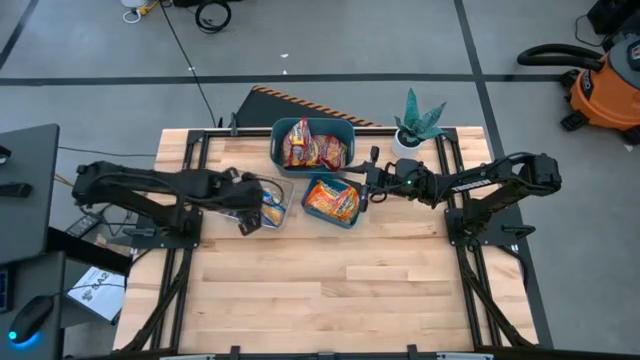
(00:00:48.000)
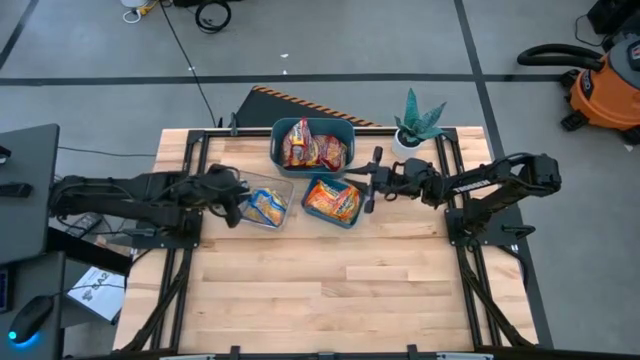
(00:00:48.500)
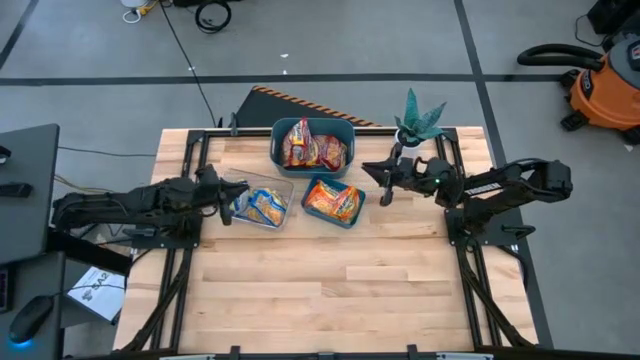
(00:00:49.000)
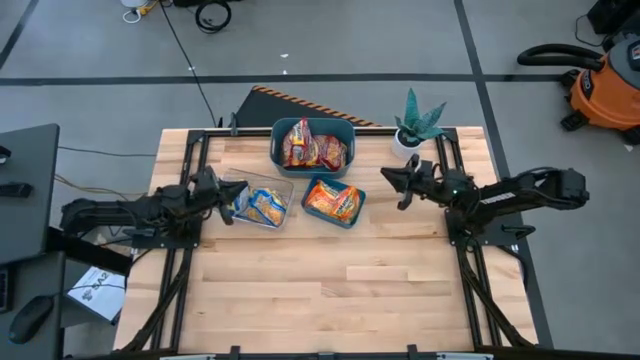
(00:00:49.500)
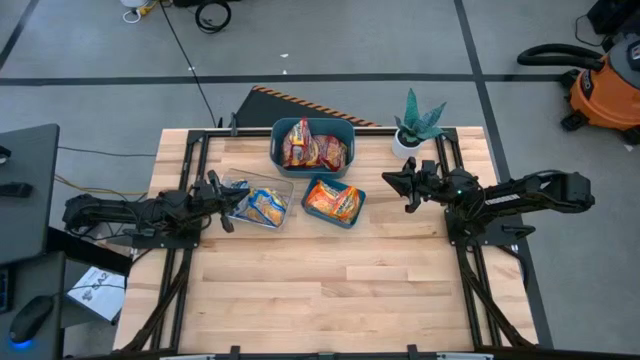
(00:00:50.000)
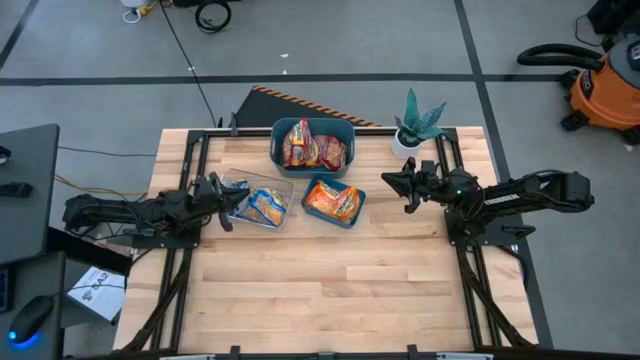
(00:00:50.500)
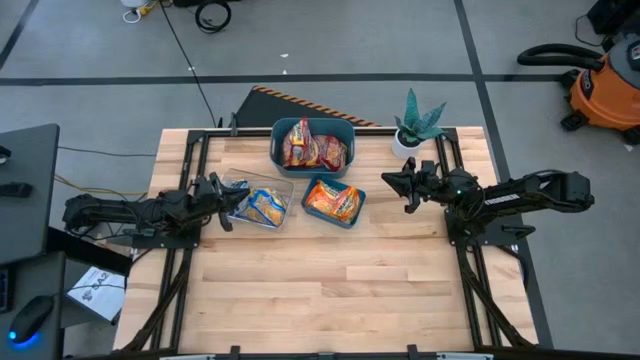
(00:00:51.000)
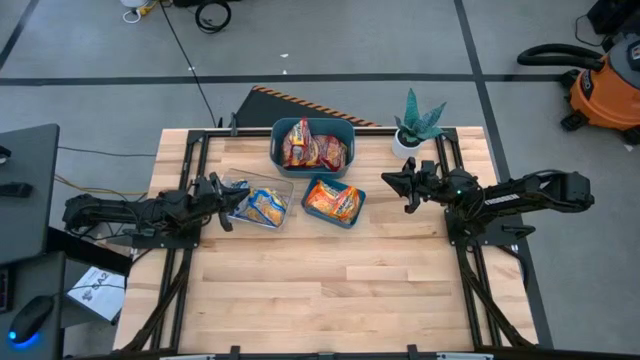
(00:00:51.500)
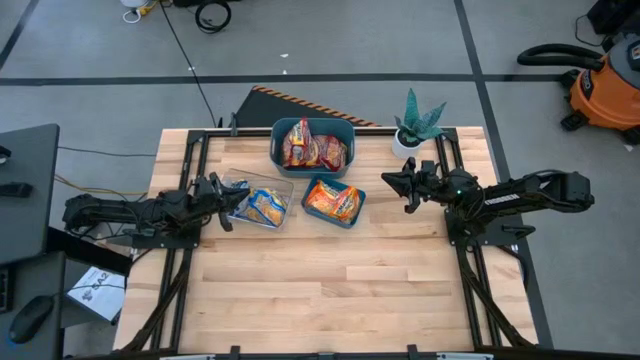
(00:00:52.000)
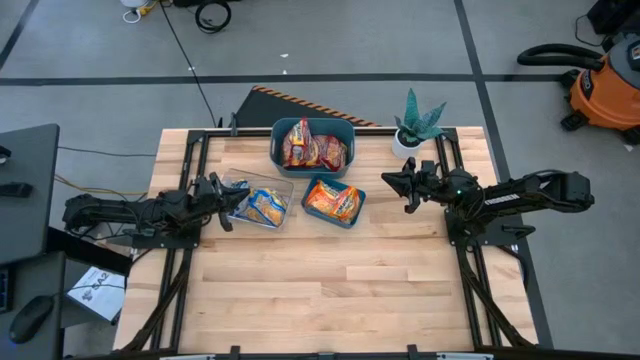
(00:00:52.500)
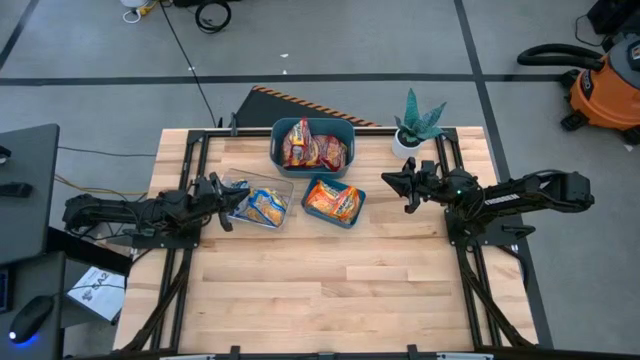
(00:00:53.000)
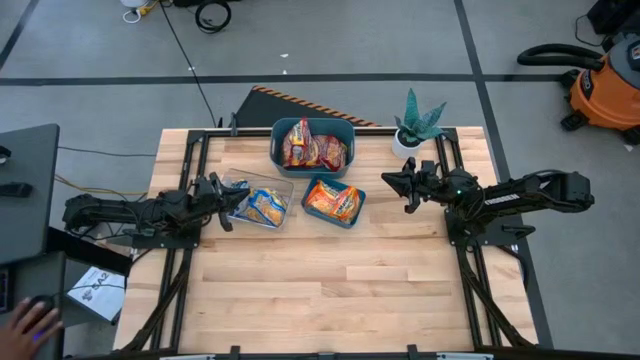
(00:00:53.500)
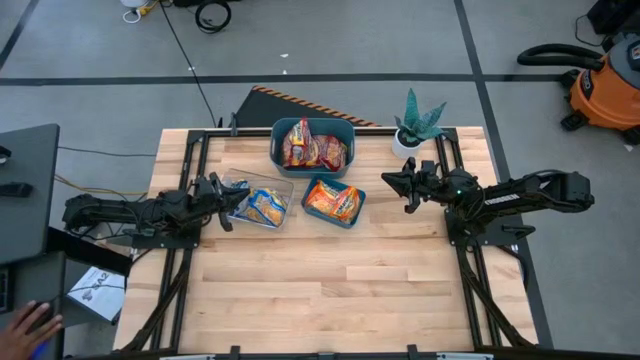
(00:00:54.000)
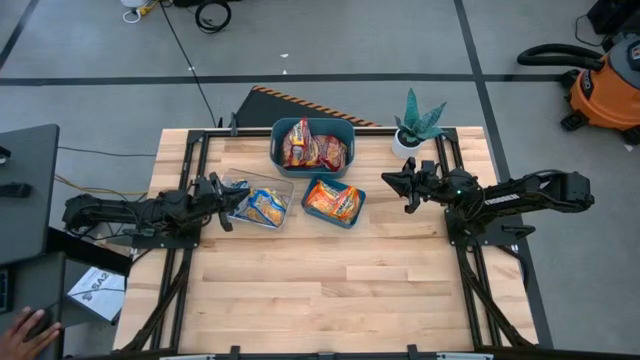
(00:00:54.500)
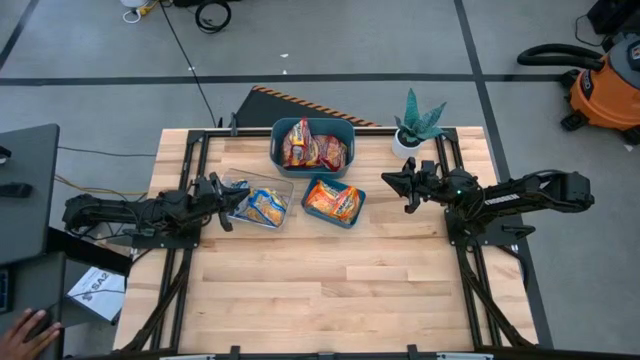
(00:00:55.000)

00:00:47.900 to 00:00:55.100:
Task: Sort Maruchan noodles
Return to Home Position

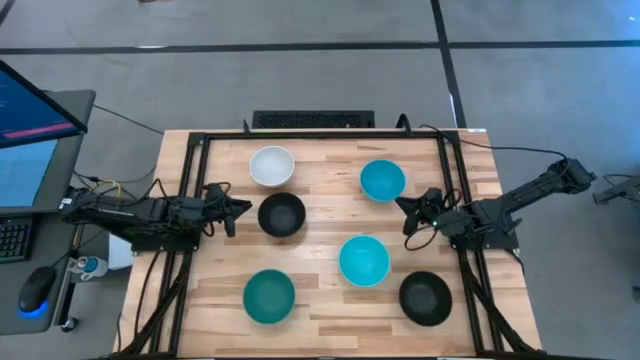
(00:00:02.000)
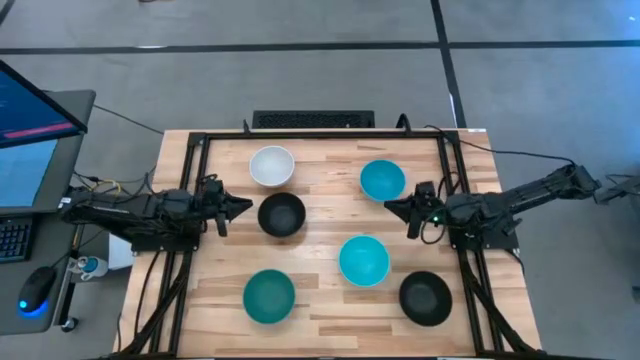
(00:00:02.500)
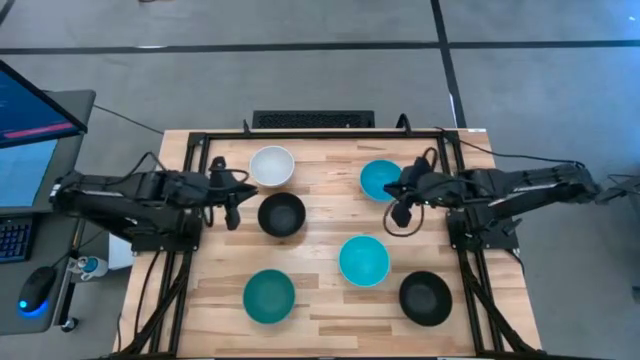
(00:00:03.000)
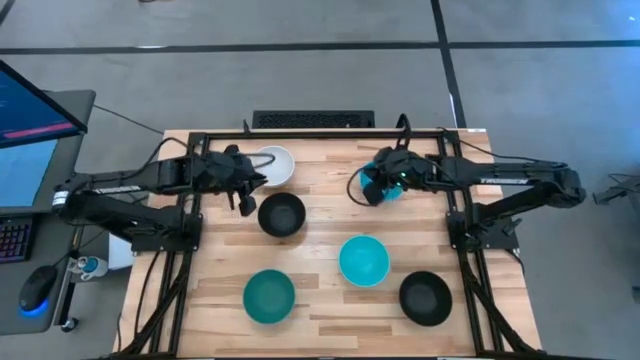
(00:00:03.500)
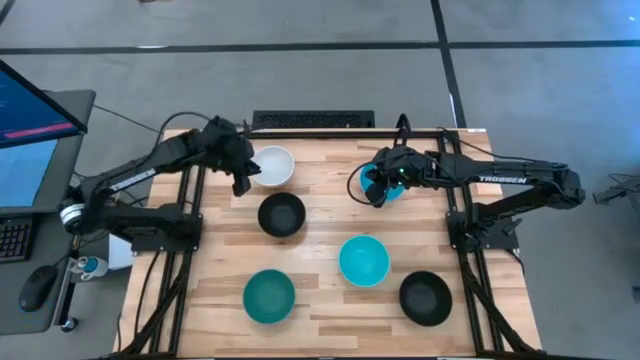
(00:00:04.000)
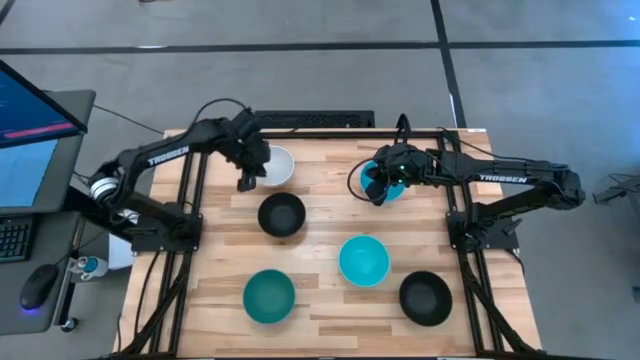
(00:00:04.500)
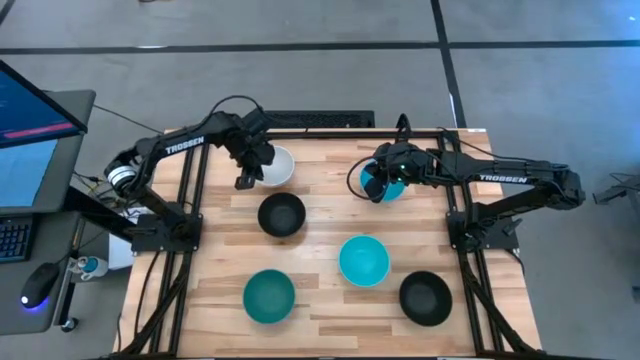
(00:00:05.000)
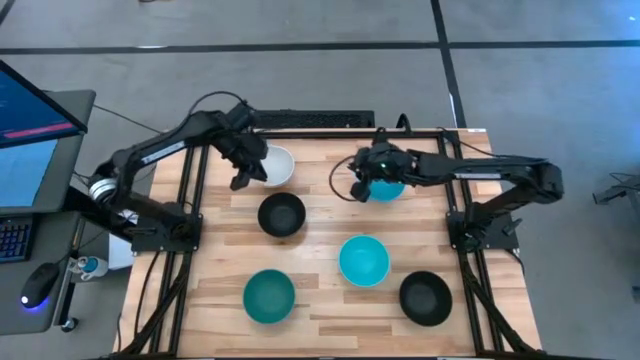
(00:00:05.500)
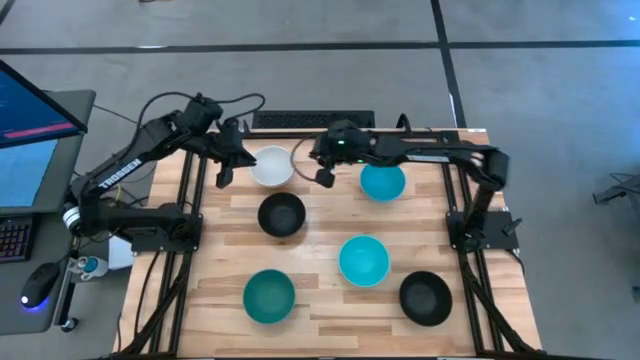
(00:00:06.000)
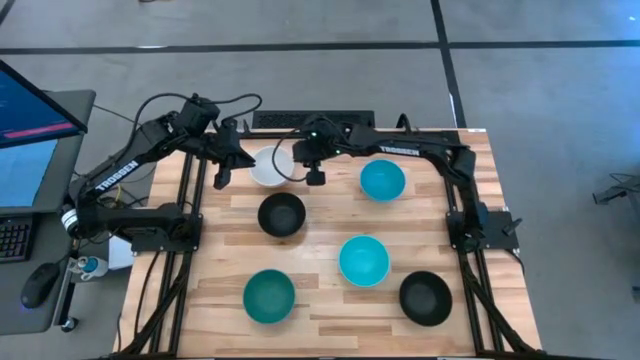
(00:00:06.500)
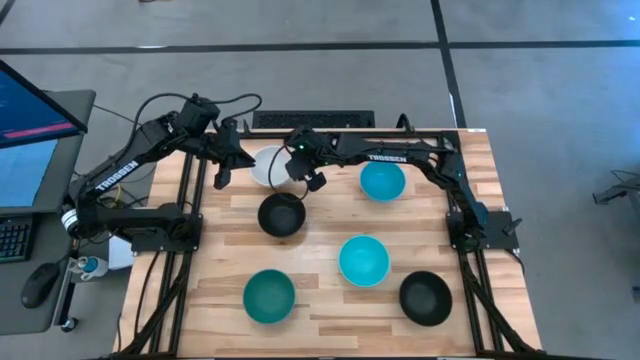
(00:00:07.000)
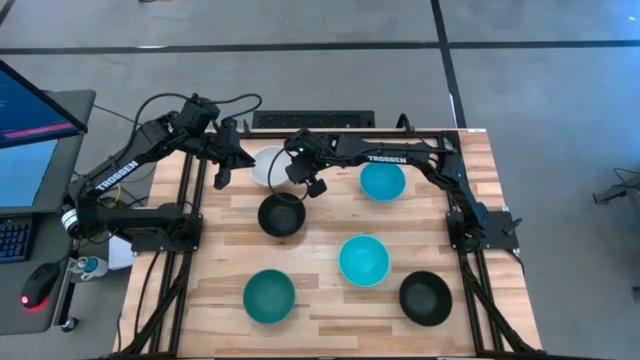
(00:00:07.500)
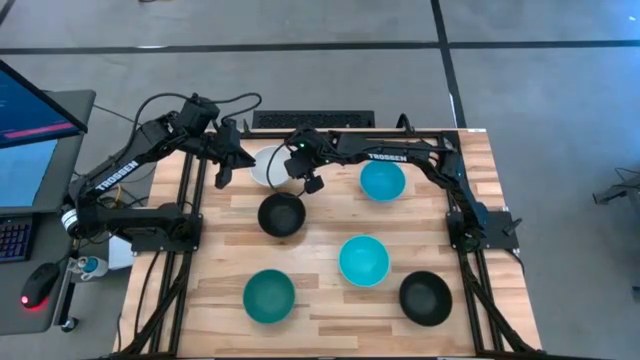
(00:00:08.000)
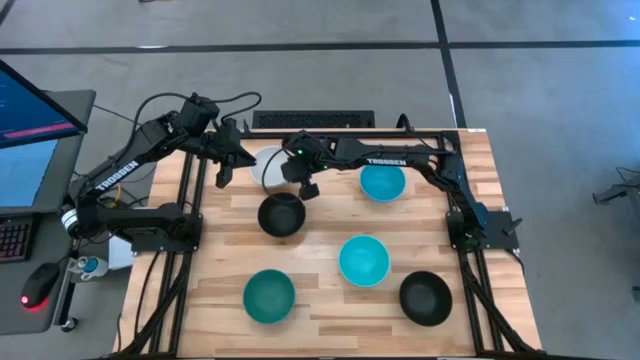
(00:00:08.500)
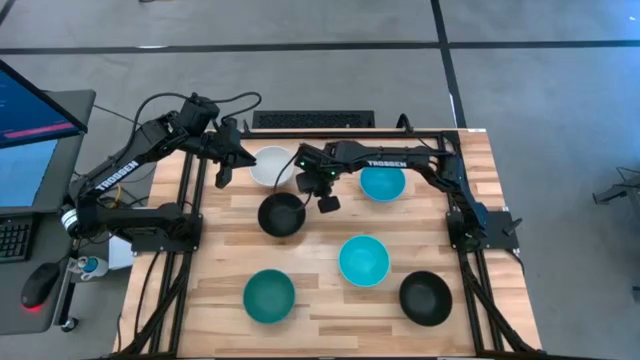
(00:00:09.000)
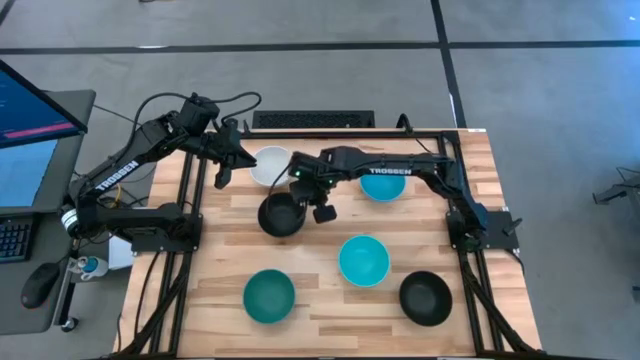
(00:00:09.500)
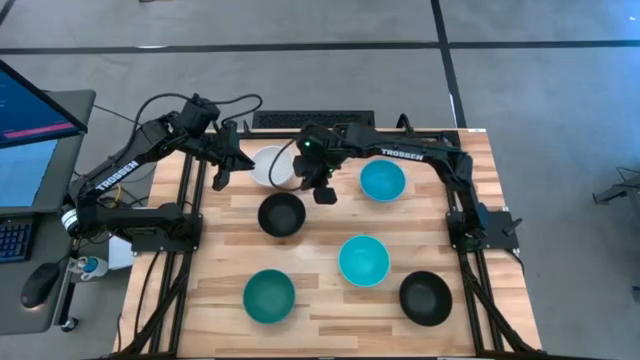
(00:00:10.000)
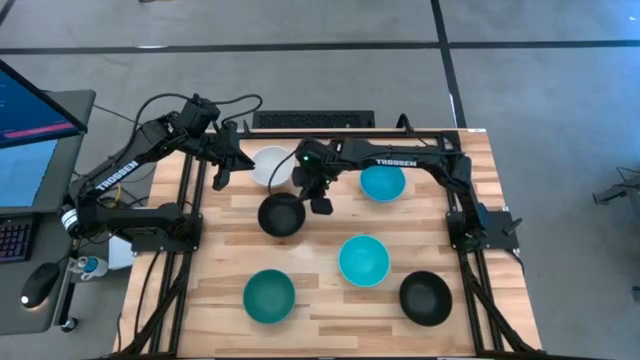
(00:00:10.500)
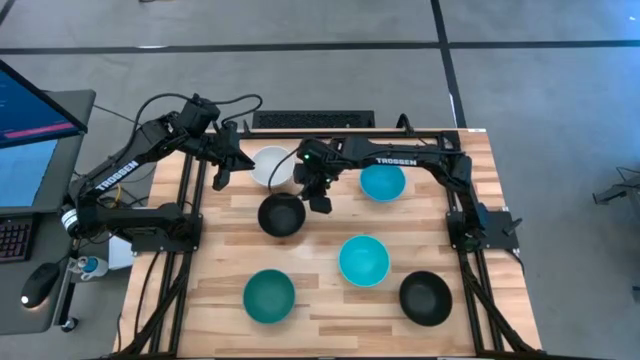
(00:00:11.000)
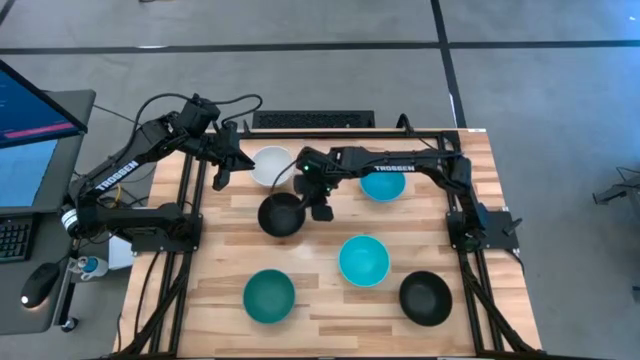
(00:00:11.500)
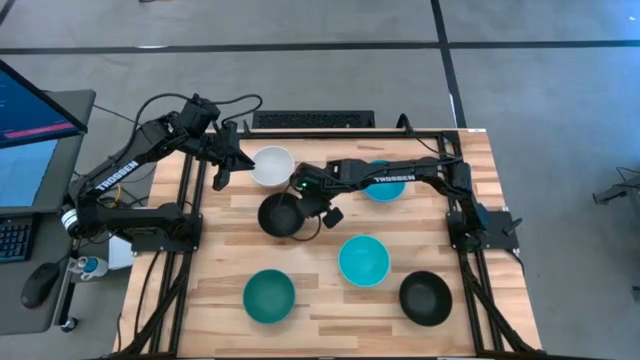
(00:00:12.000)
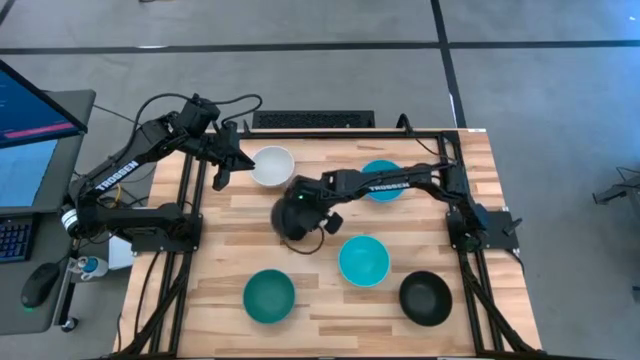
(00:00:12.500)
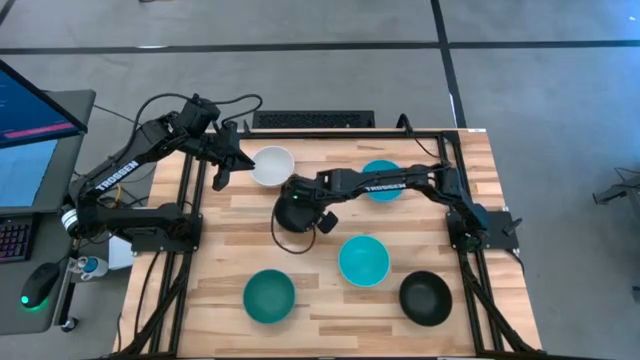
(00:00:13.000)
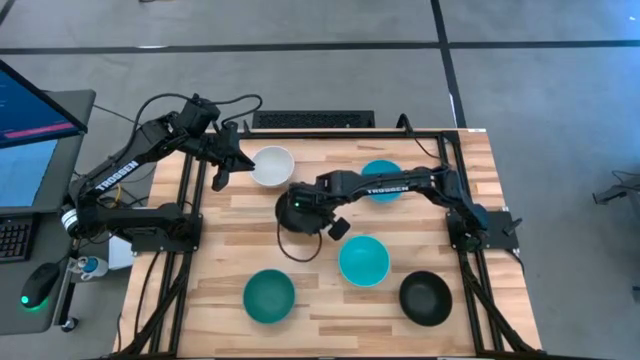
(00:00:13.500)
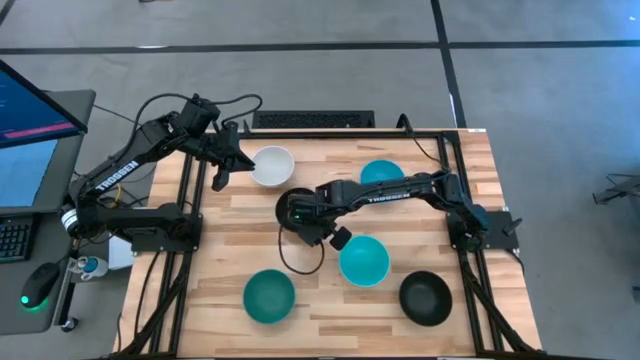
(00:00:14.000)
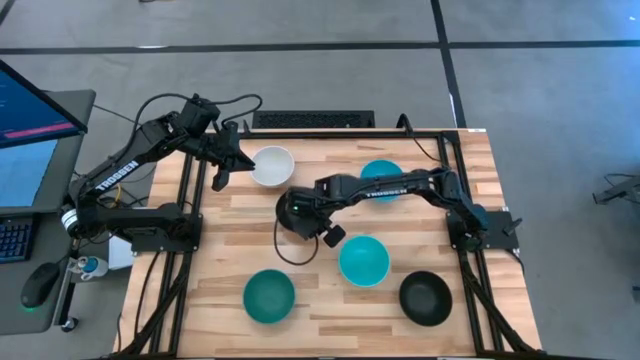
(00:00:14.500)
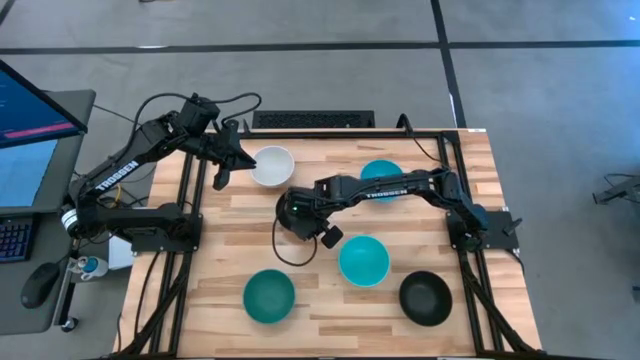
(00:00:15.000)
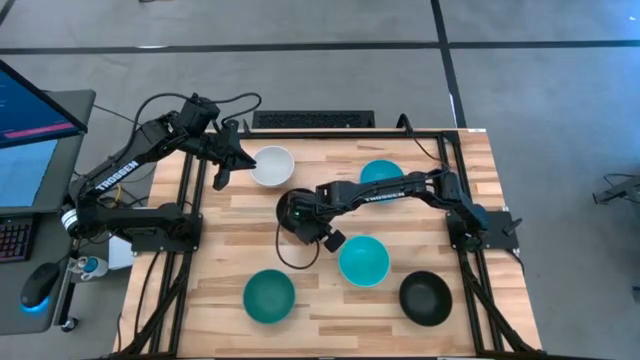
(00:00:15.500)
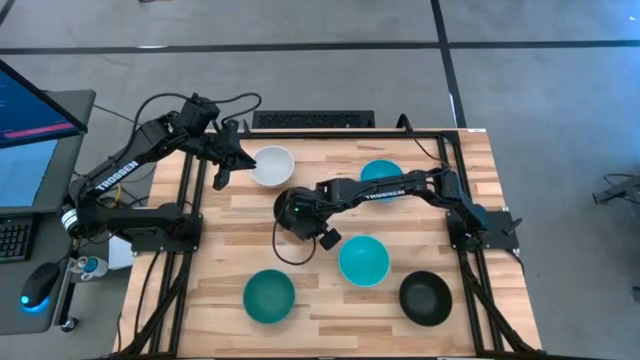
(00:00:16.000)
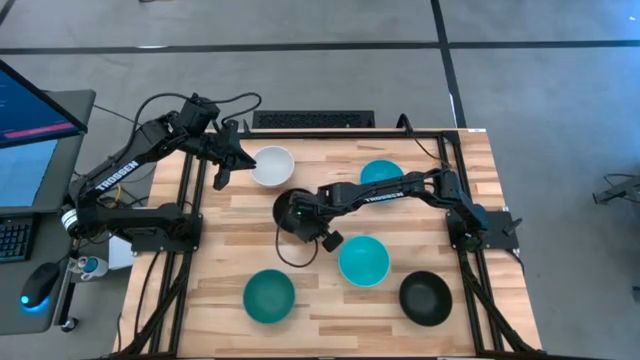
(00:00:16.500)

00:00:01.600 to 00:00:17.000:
Task: Nest bowls inside each other
Stack the black bowl on the blue bowl
